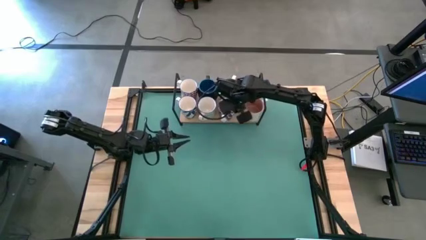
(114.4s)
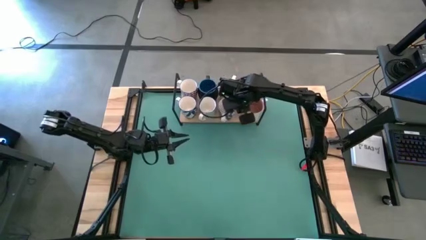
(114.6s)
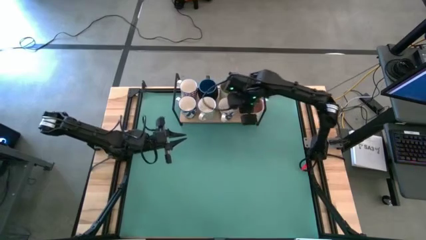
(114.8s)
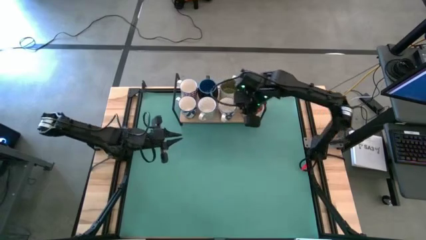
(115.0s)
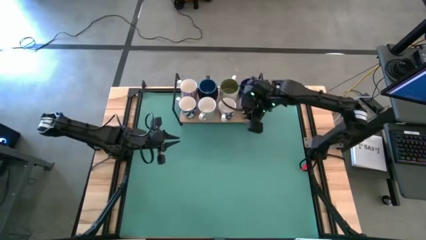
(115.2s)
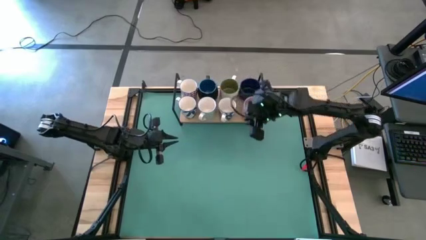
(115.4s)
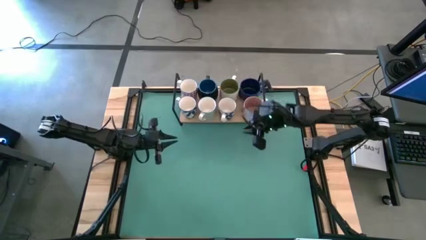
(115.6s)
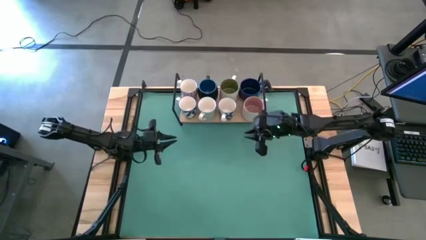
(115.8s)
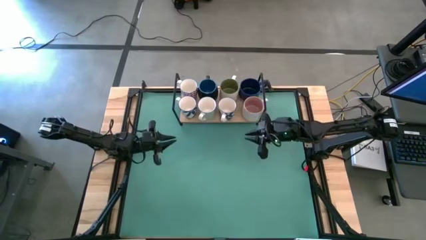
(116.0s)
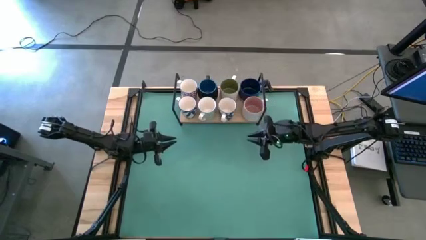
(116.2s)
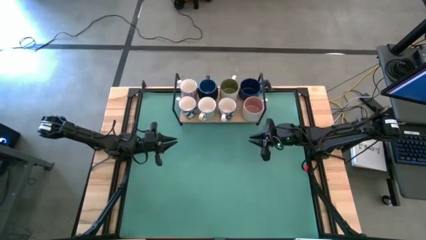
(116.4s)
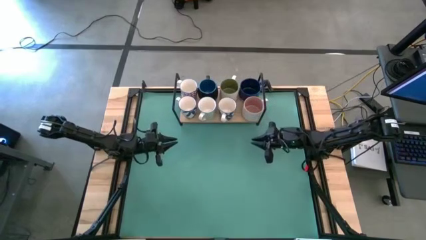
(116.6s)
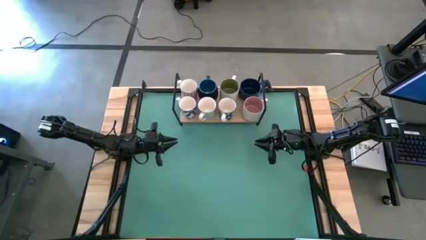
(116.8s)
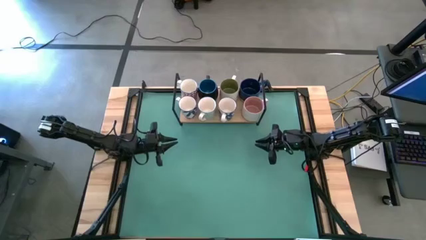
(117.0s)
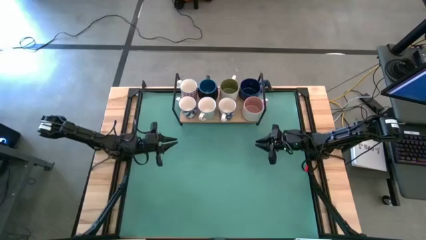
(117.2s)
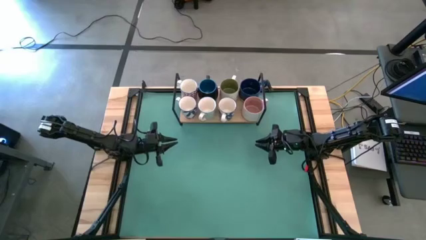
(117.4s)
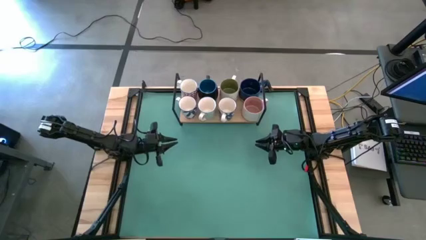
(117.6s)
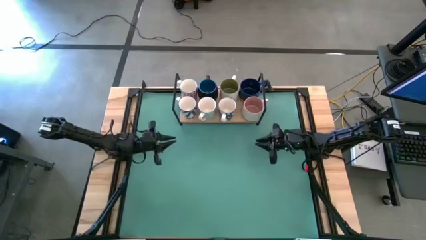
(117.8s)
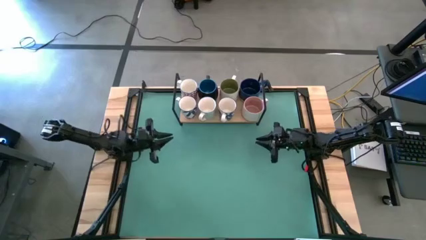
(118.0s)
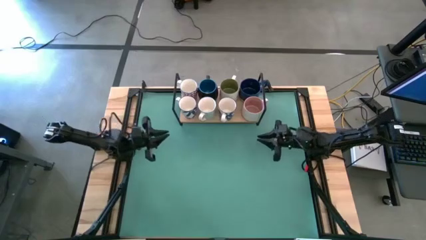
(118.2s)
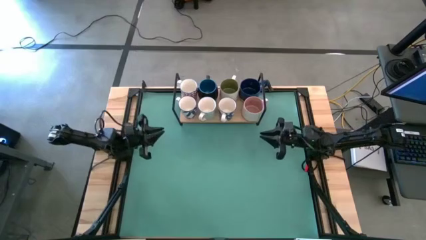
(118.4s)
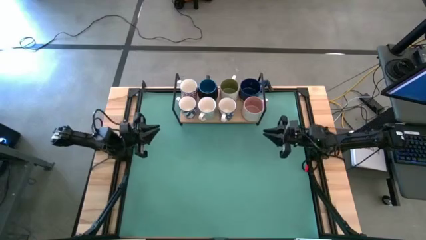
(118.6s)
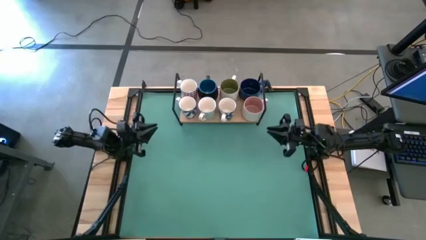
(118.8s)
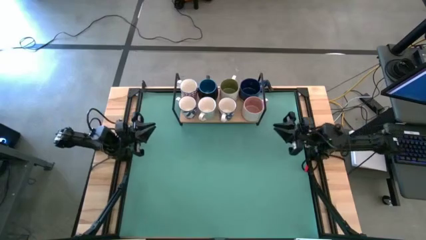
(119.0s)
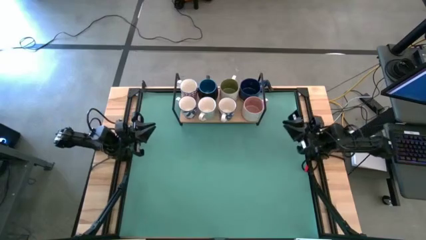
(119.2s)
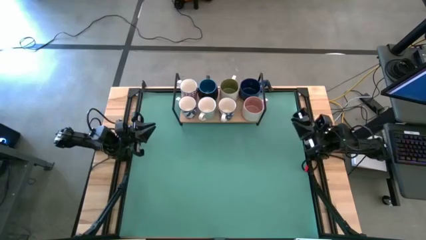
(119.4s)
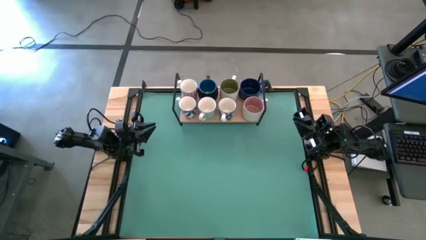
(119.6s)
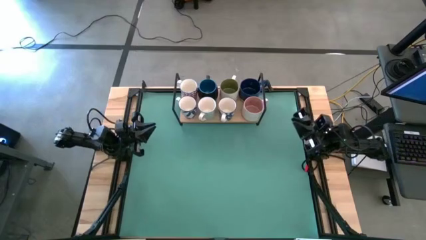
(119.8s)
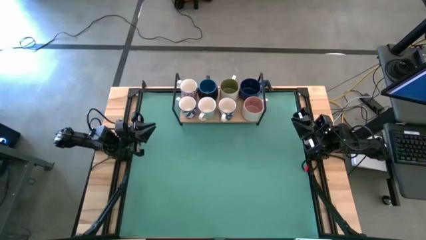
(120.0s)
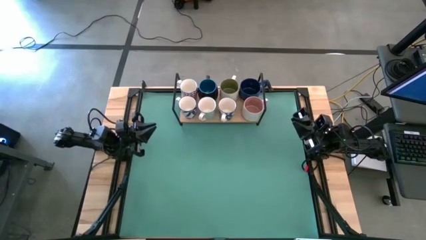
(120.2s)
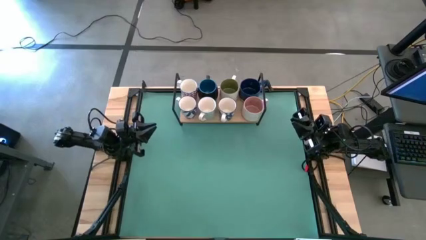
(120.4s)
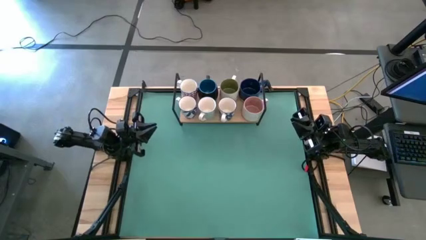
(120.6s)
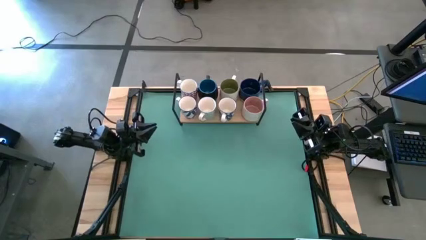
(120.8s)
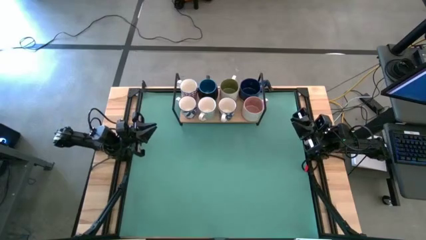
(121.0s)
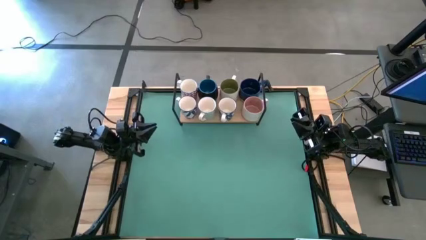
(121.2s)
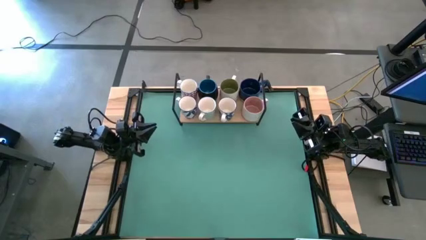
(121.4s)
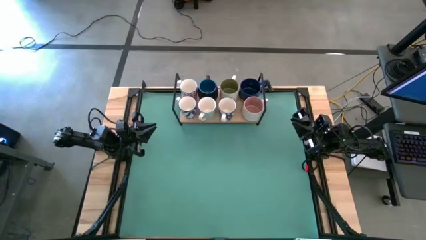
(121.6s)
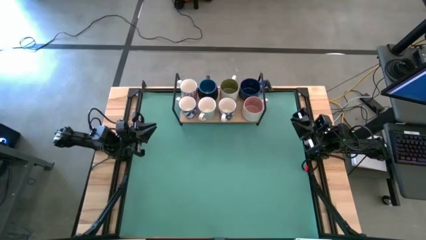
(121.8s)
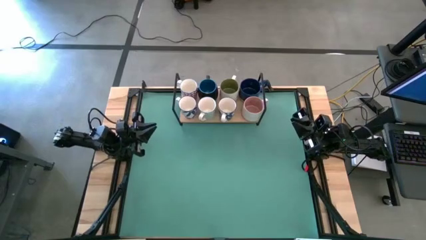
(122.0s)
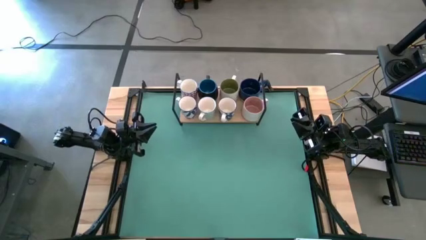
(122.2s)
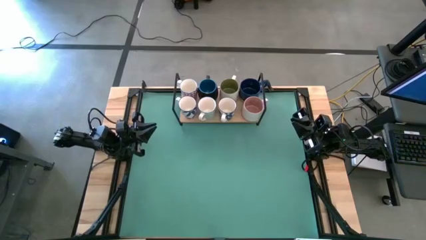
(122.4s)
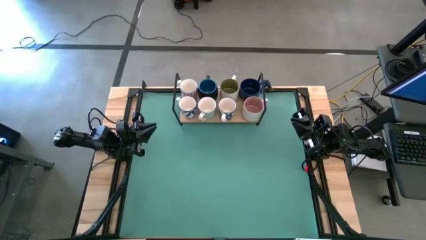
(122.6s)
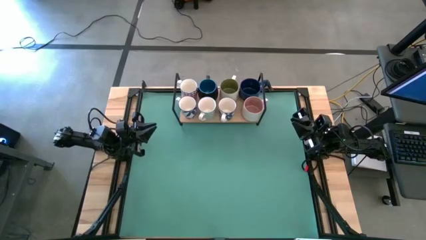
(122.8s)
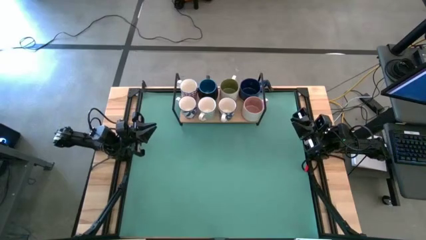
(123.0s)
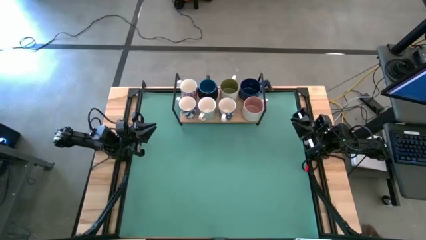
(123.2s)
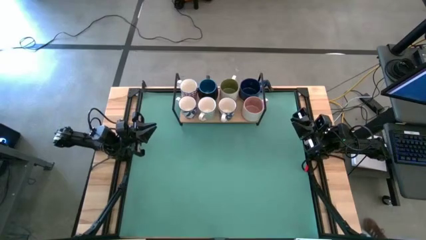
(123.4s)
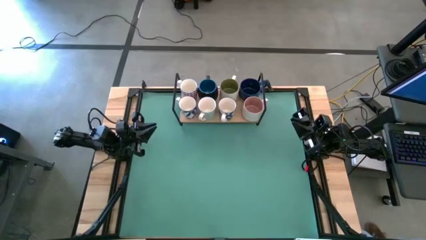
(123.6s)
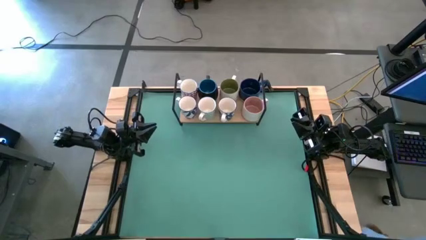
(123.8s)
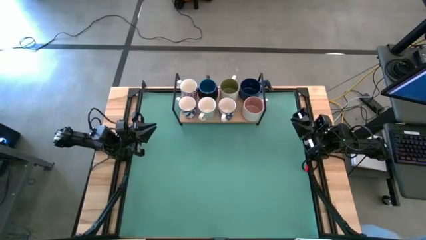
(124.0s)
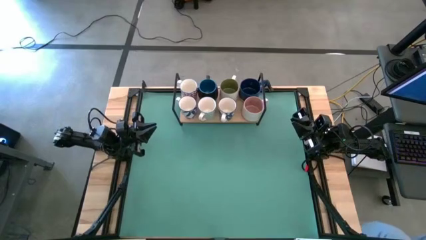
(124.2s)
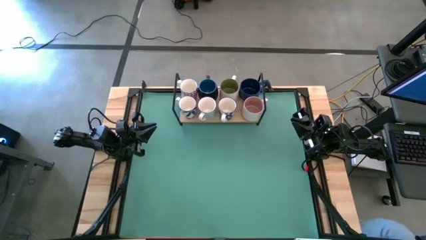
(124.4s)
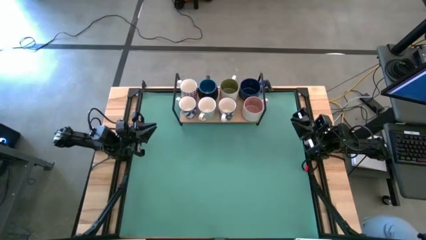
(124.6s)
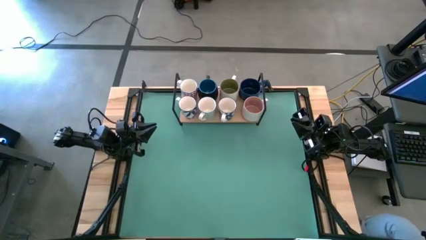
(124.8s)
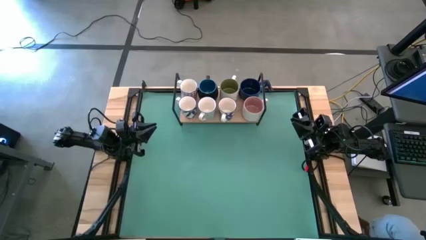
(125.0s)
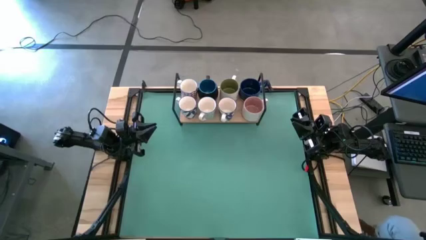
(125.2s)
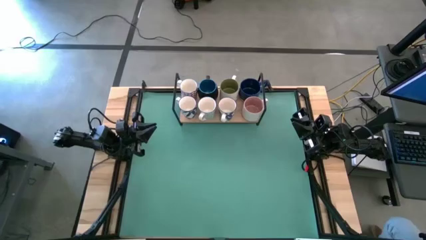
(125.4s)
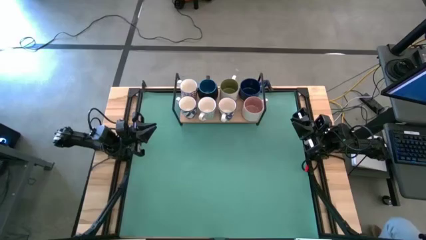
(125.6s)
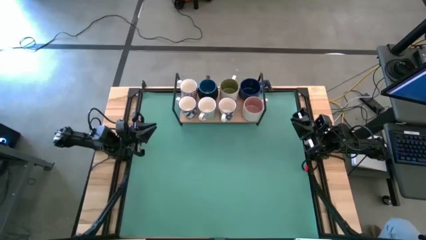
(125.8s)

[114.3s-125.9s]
Task: Place coffee mugs
Return to Home Position

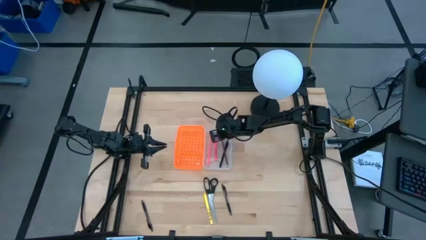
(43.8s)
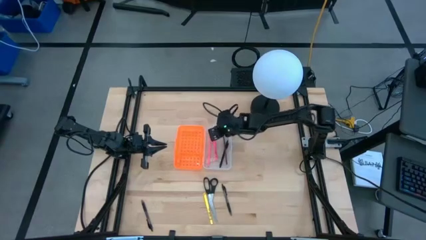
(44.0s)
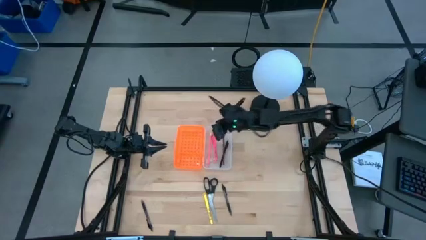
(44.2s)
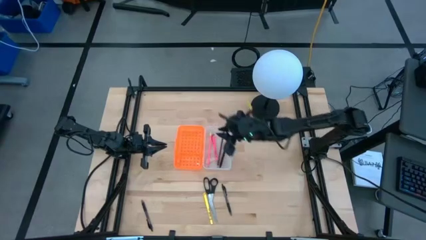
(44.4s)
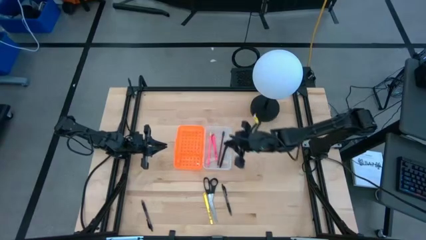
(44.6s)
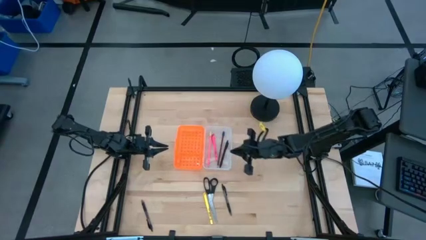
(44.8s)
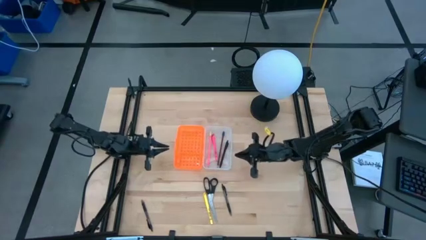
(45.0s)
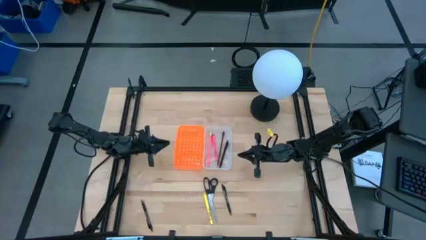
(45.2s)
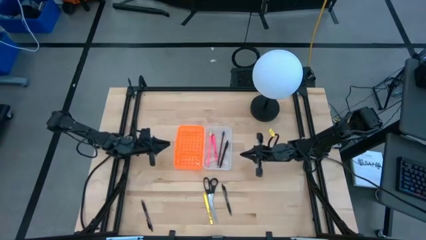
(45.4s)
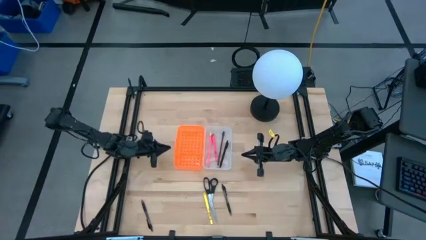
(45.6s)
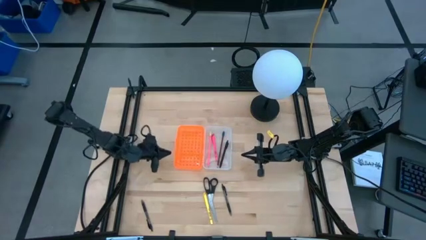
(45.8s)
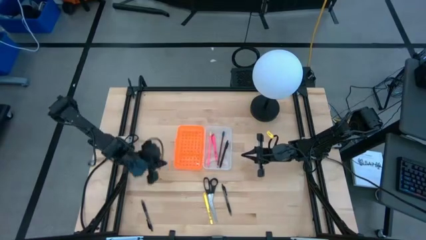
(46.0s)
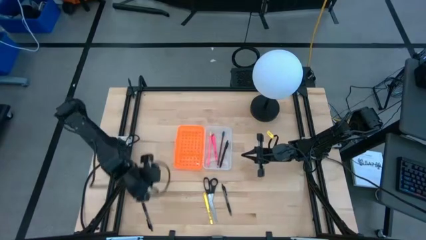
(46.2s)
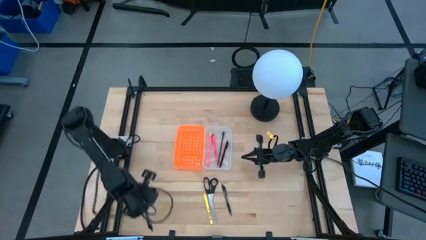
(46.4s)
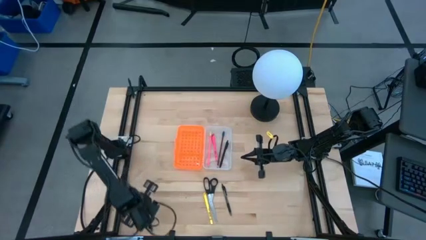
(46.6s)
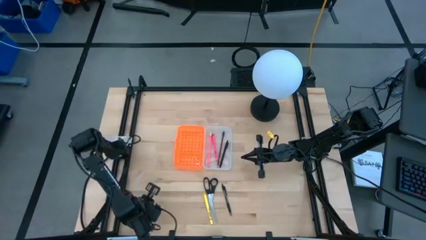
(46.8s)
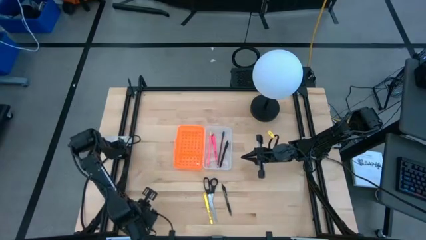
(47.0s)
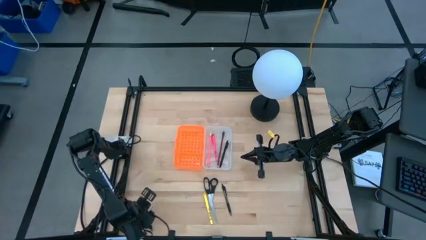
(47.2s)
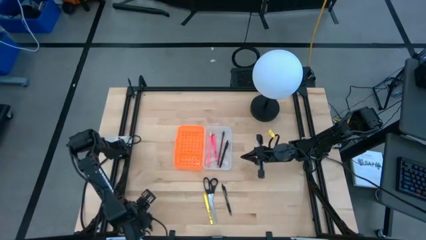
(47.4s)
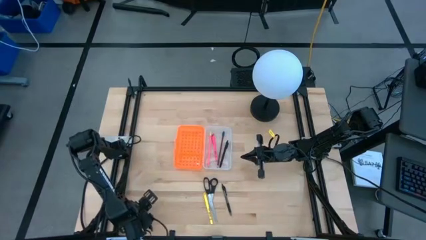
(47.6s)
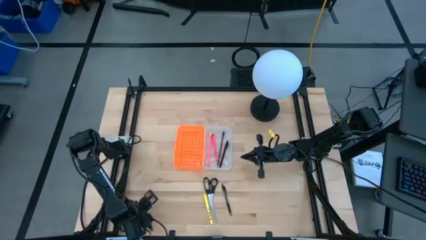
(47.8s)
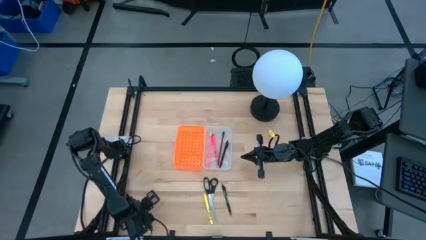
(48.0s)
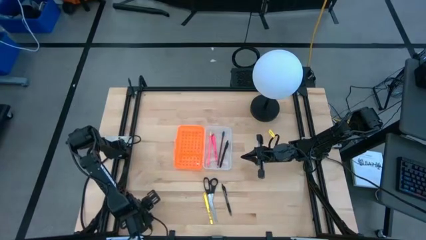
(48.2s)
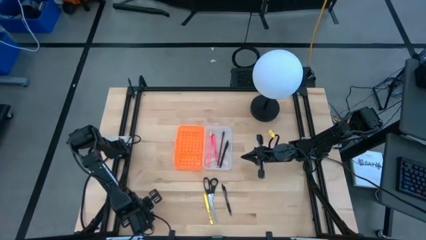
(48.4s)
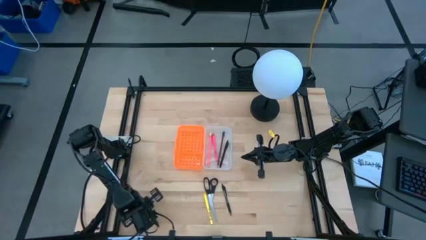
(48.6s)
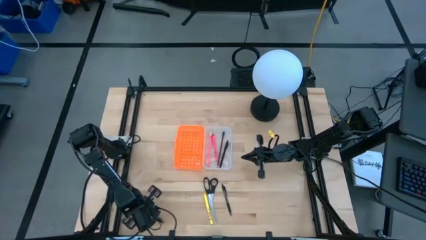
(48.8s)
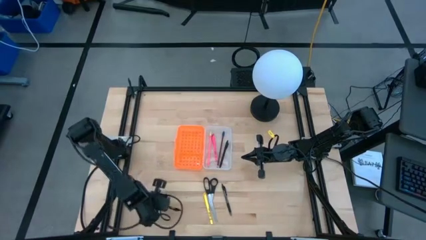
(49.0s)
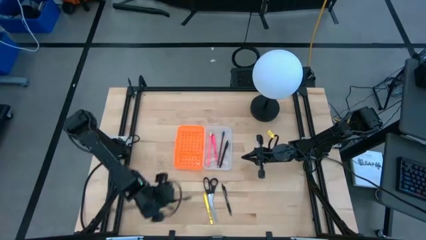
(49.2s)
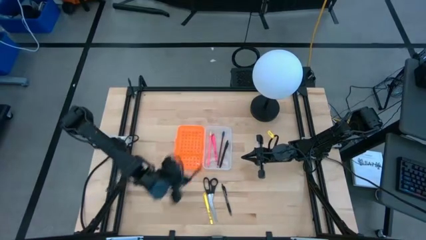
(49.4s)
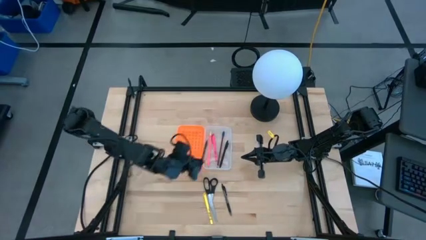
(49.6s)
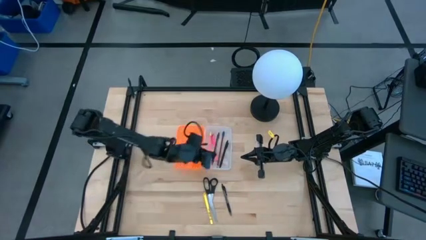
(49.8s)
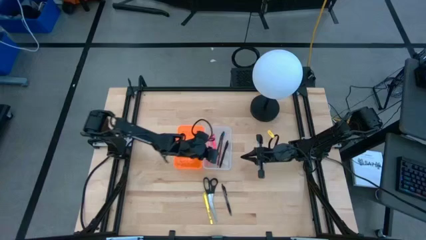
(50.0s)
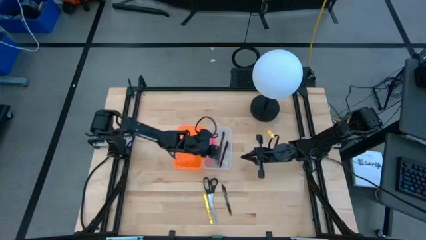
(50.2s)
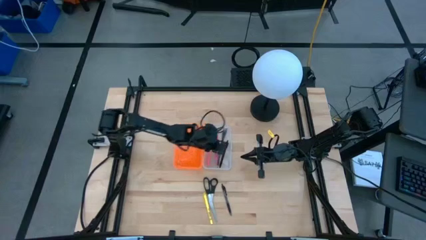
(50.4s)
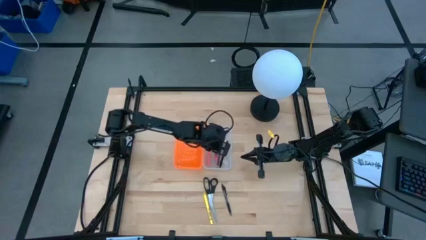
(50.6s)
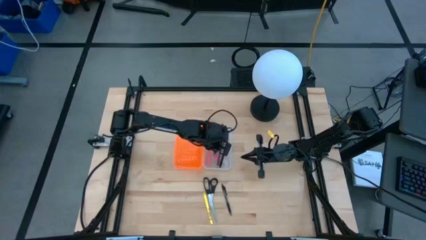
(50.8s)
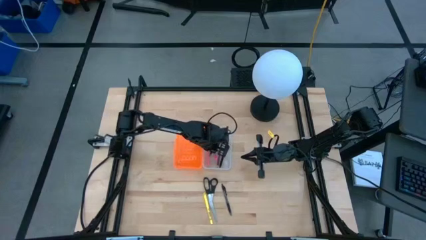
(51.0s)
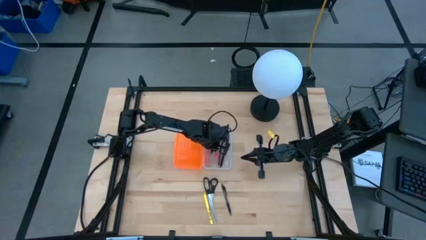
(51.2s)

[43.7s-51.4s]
Task: Pick & place school supplies into a supply box
Put the left black transparent pen into the supply box
